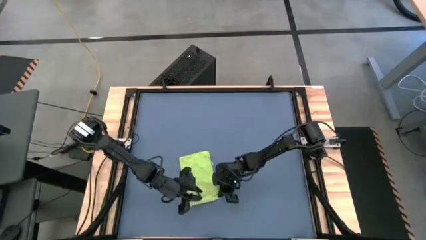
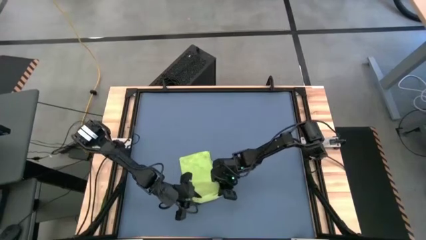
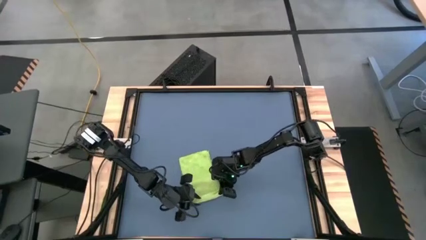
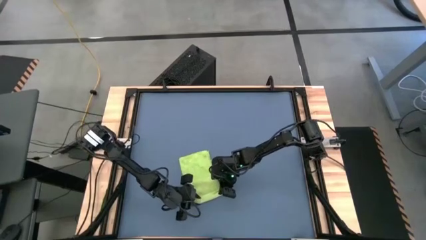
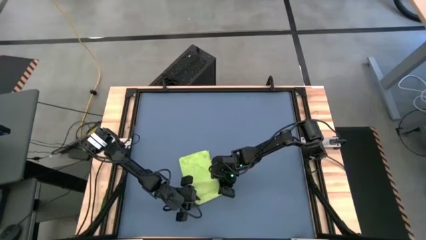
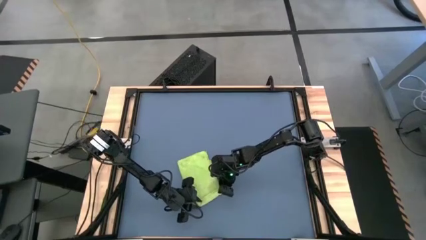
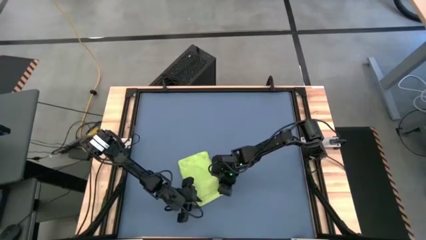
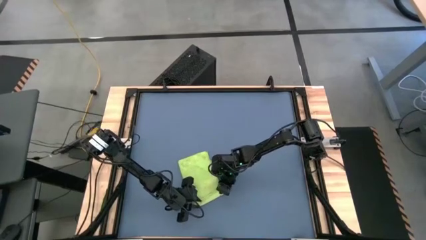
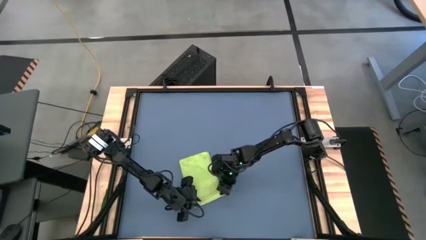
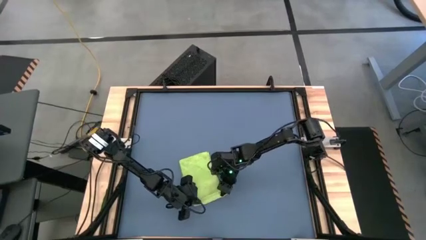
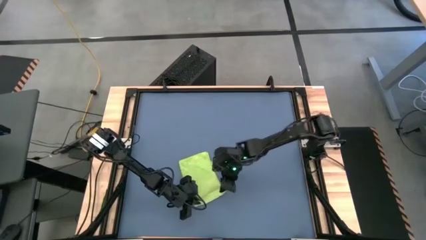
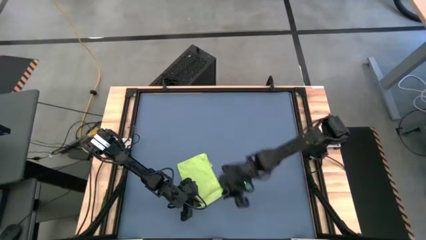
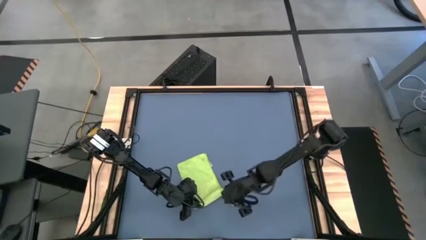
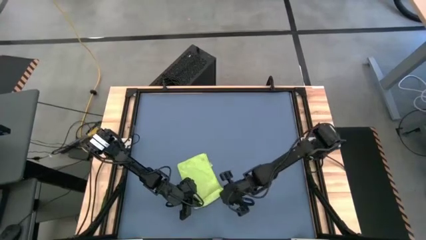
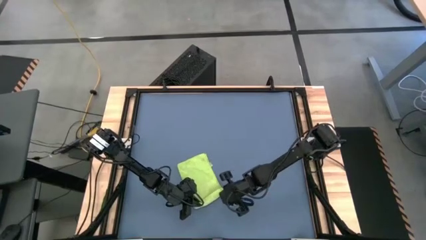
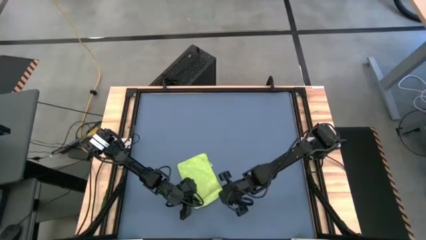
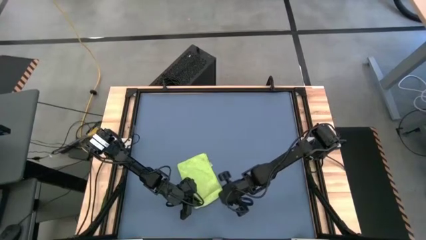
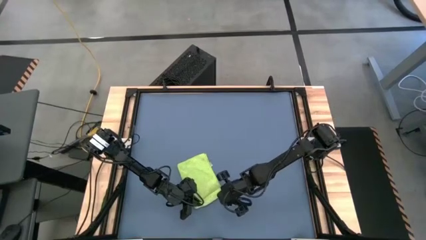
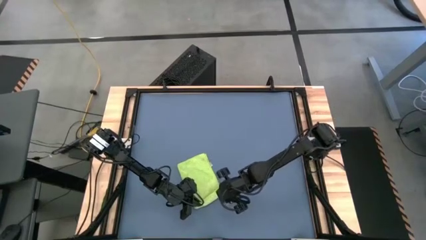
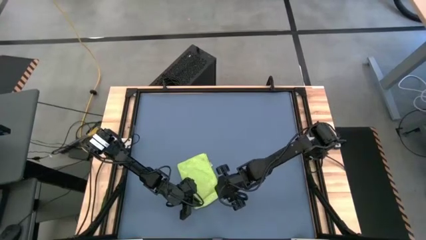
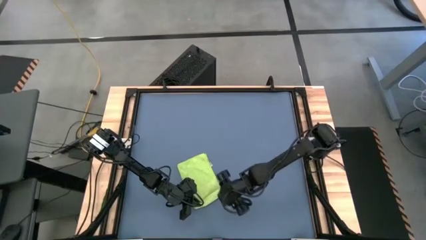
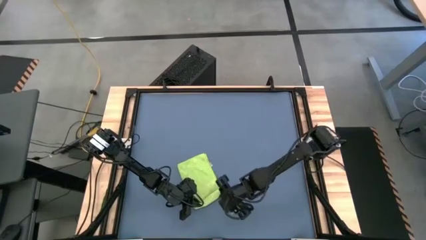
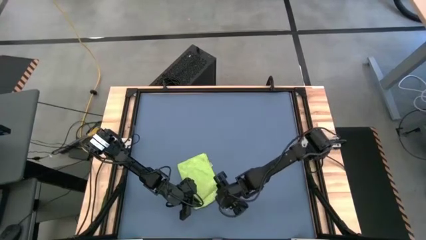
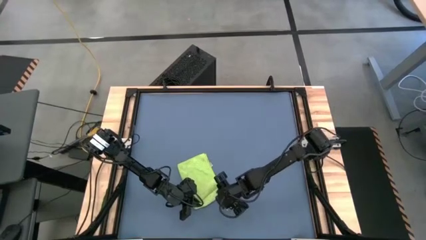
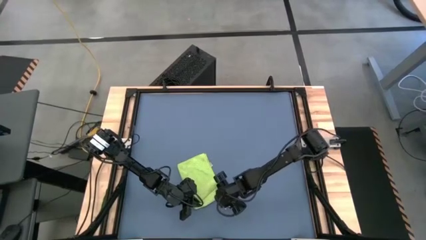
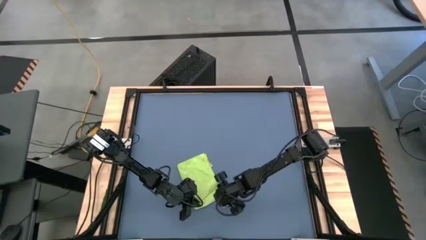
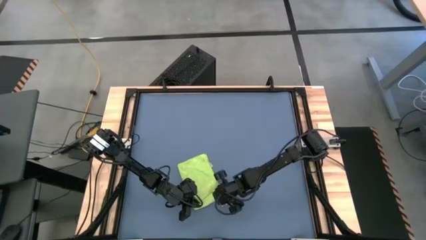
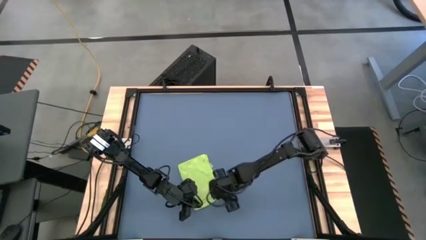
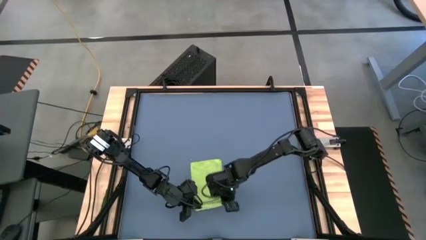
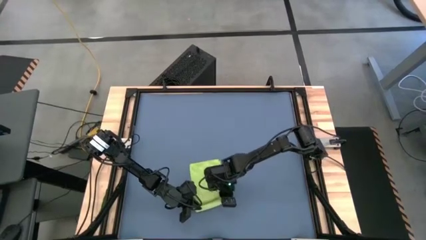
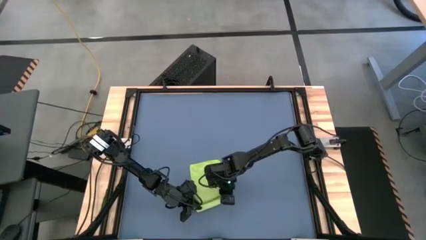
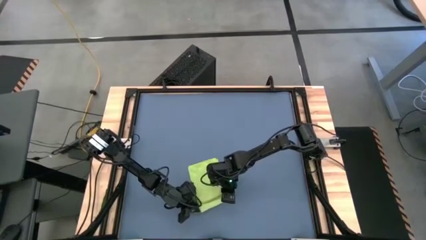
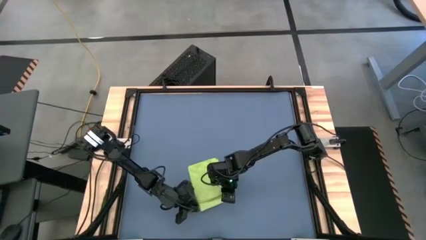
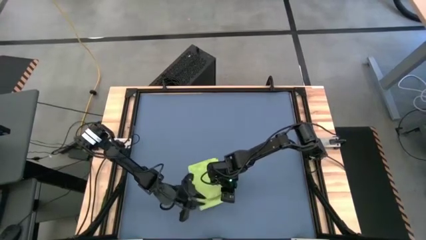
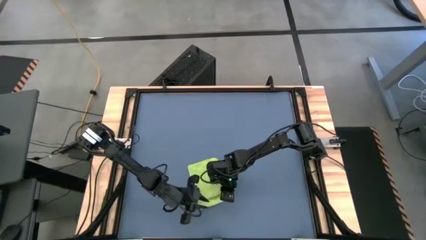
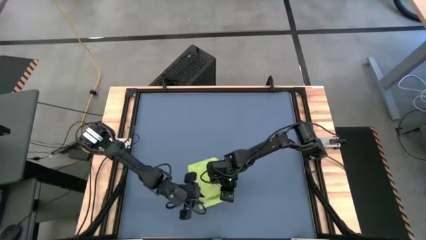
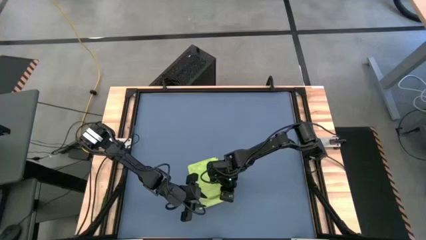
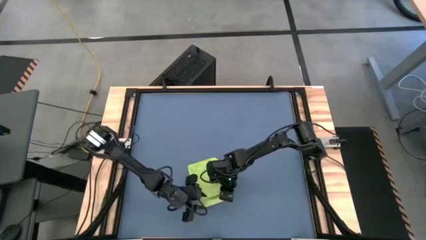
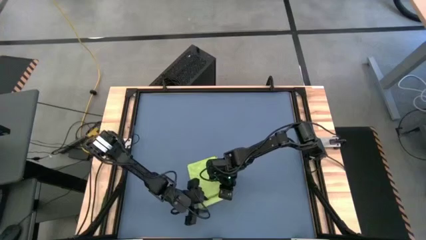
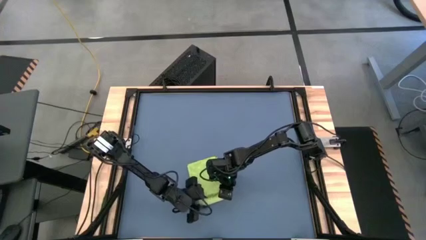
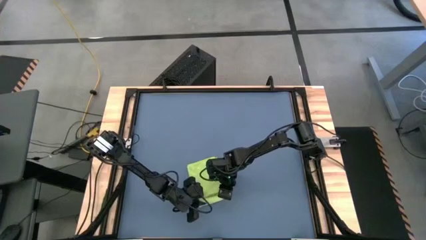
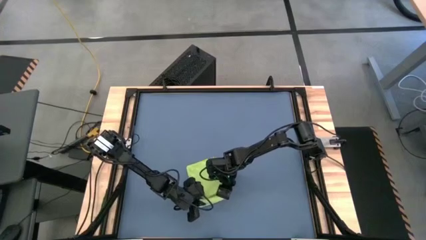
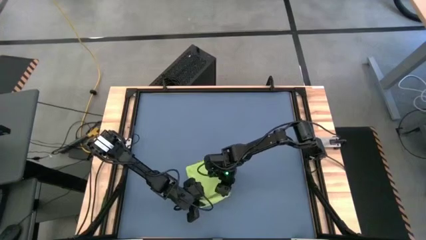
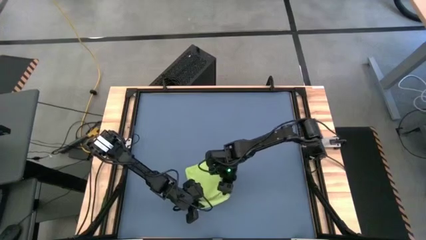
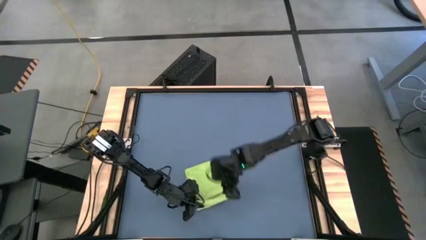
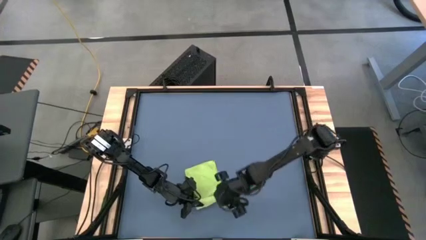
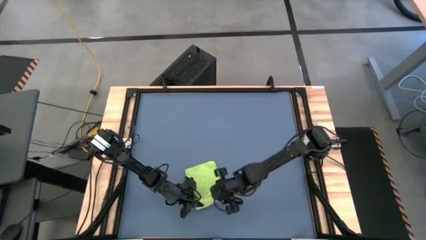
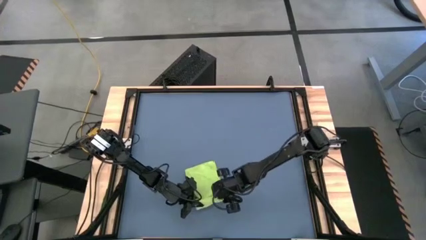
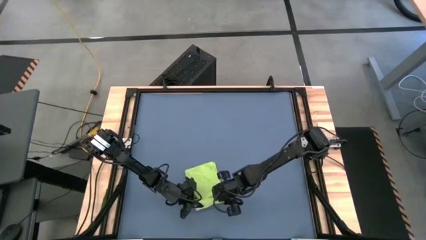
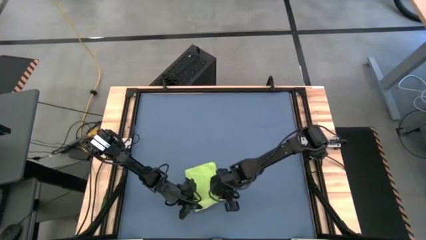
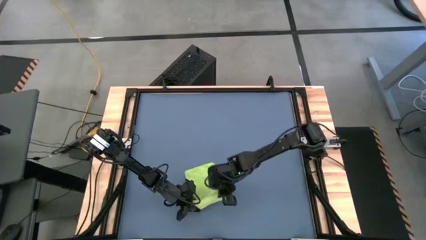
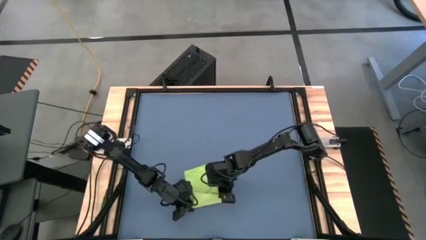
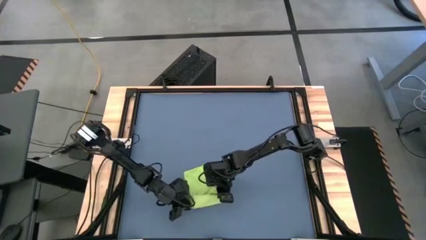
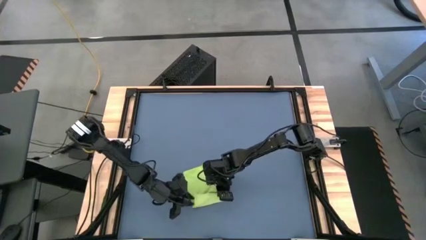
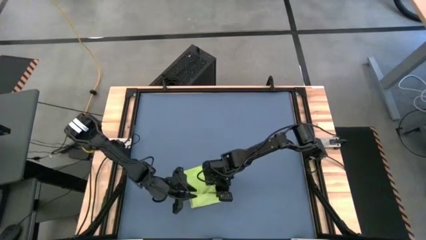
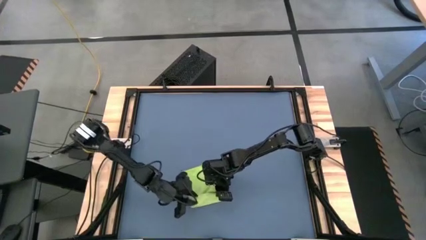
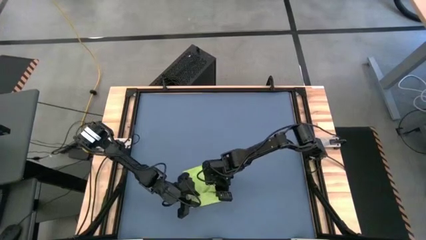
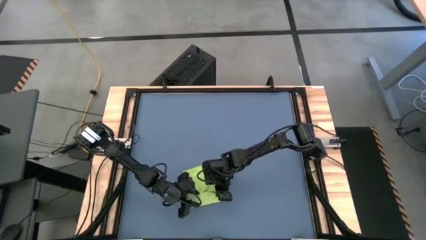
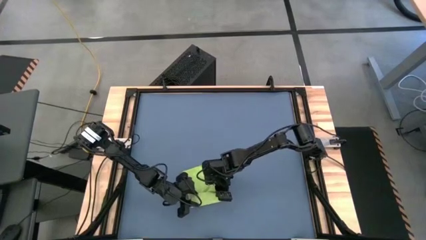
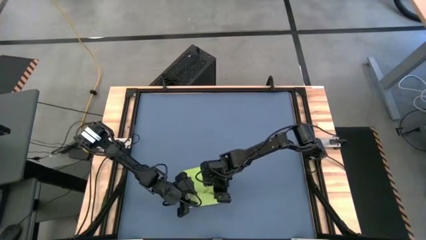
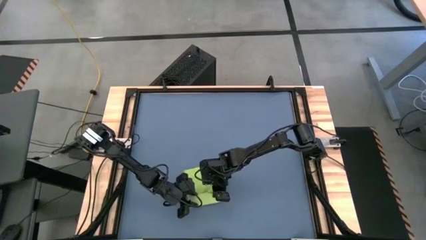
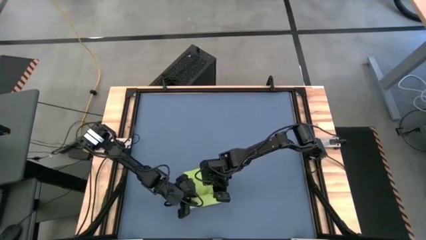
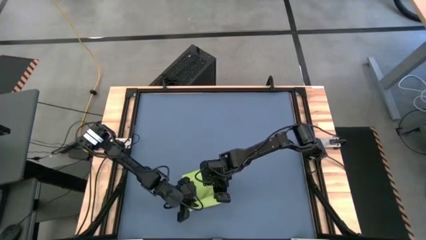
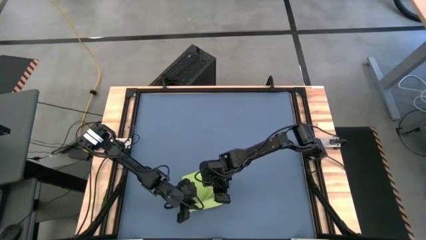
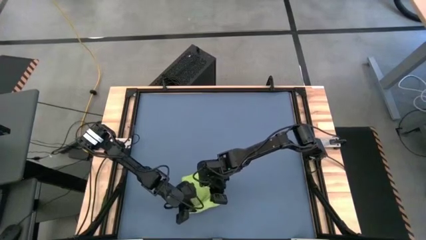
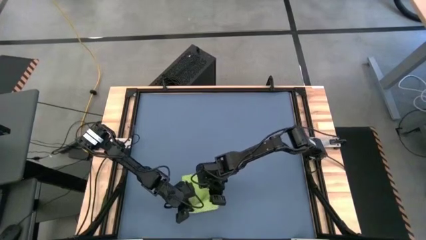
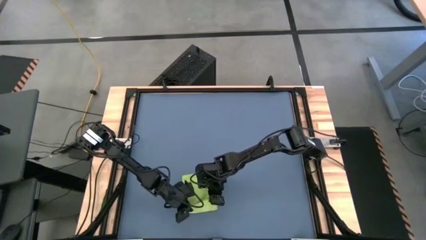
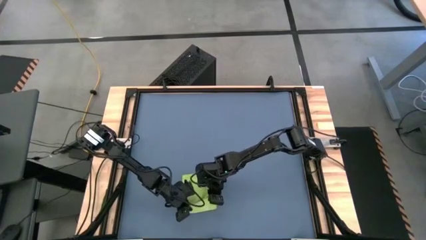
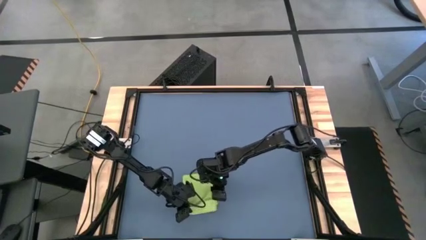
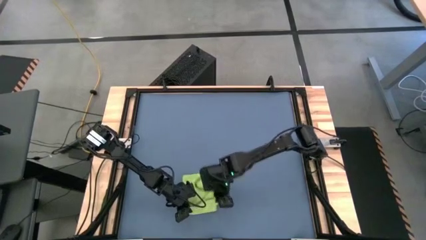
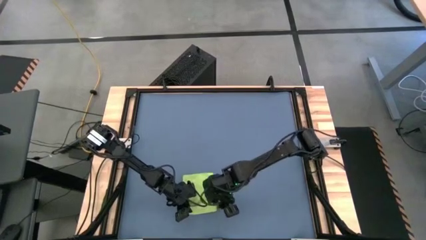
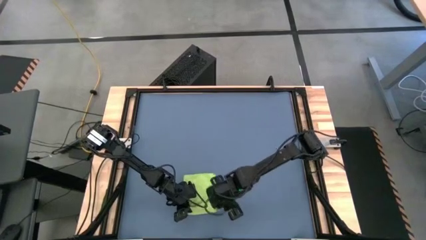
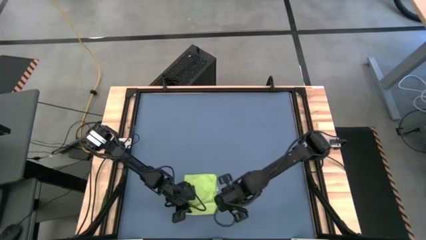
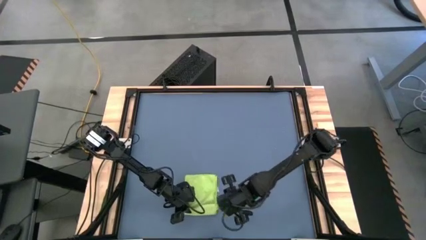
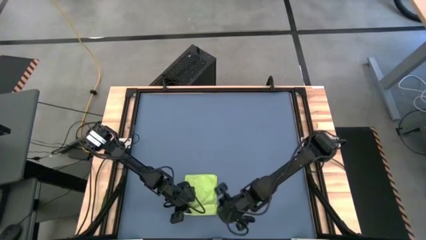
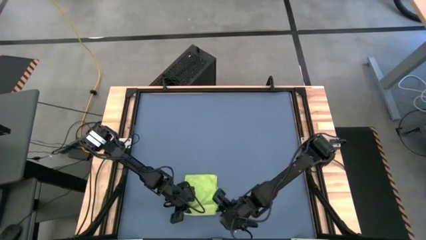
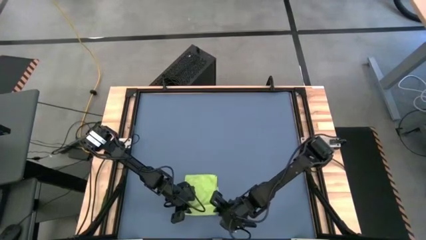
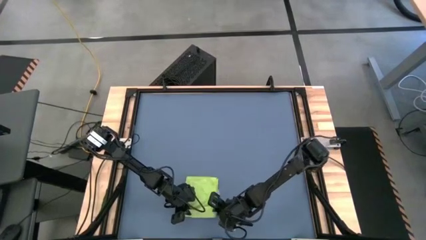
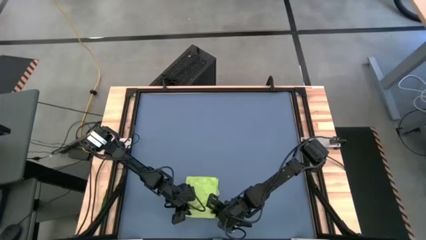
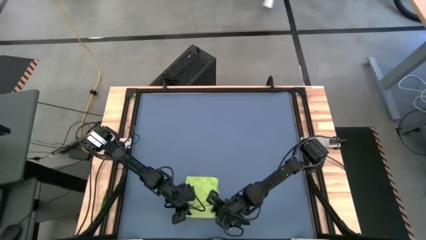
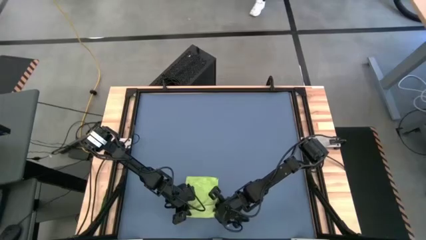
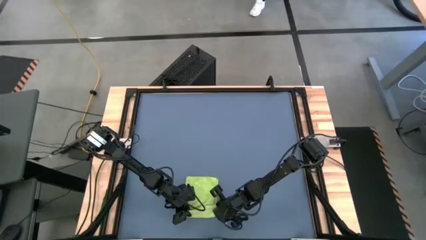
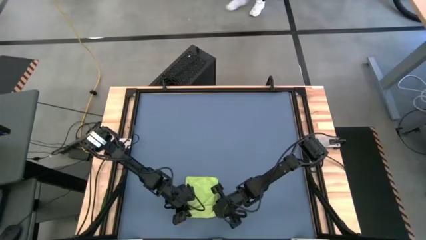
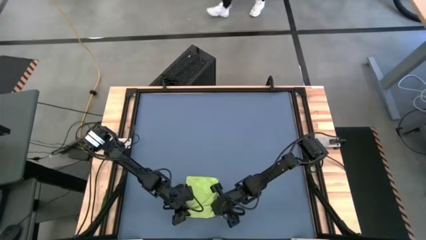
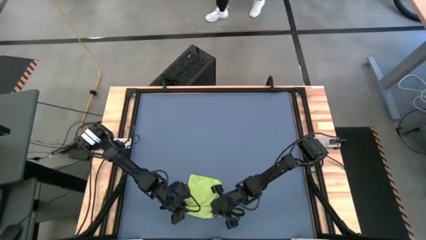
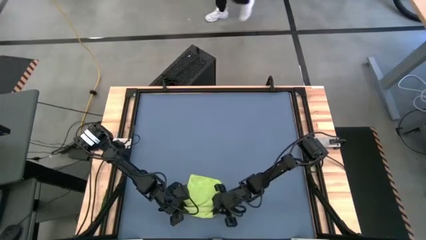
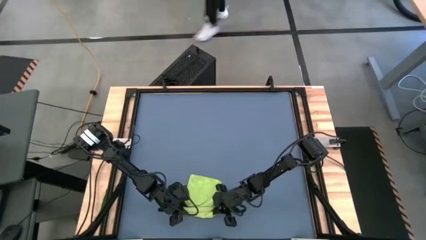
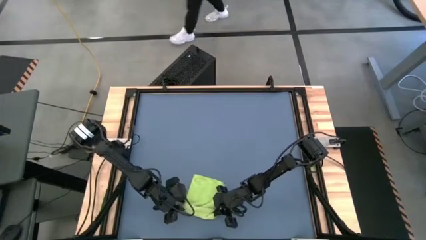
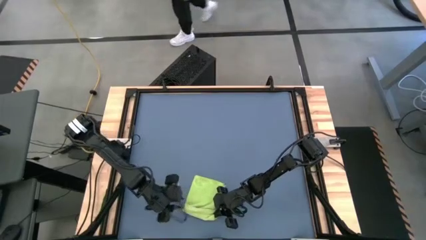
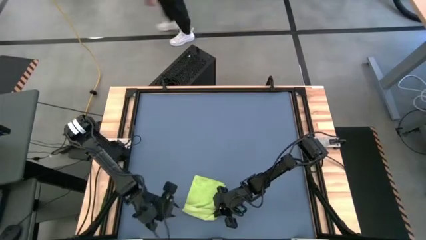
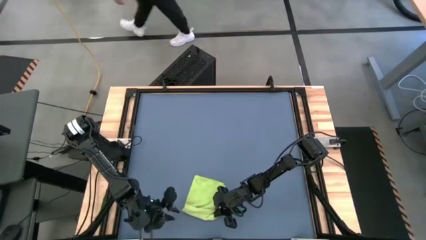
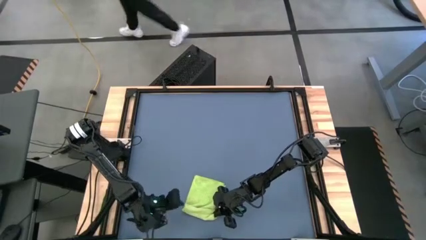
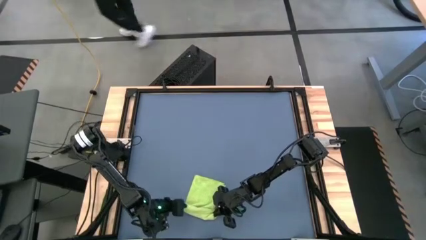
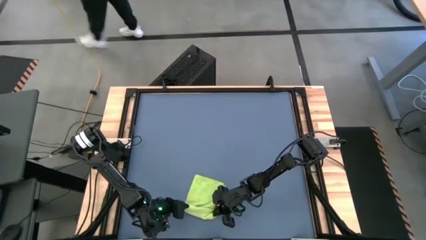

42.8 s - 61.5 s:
Task: Roll towel
Roll the green towel
